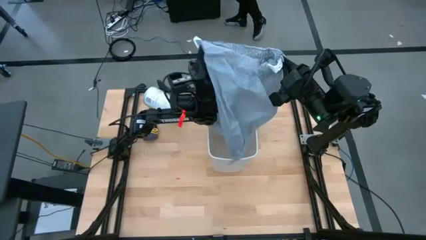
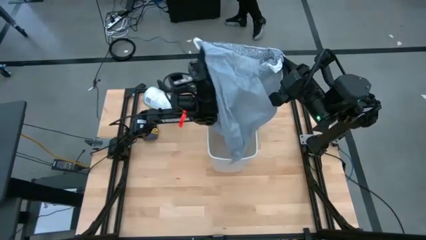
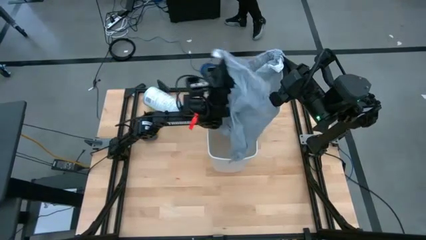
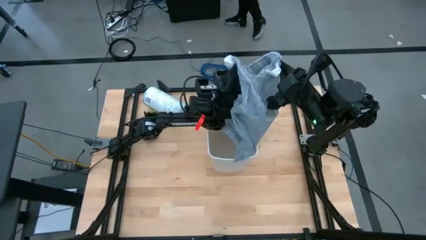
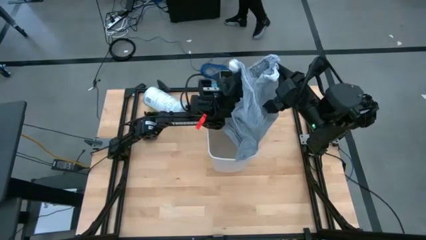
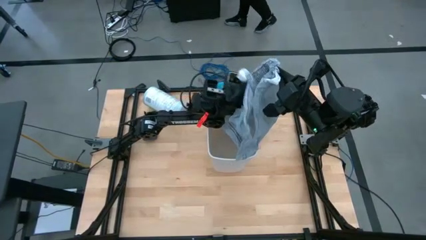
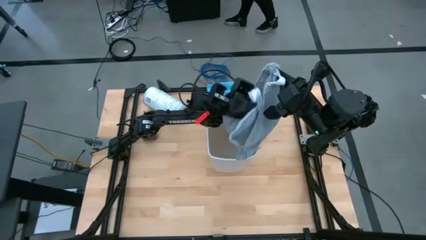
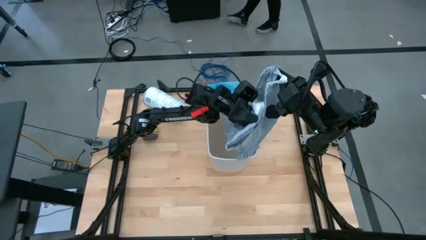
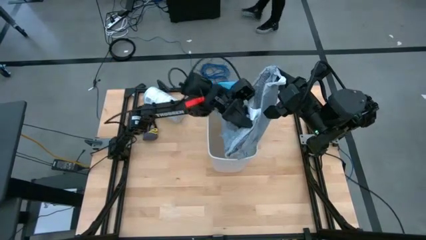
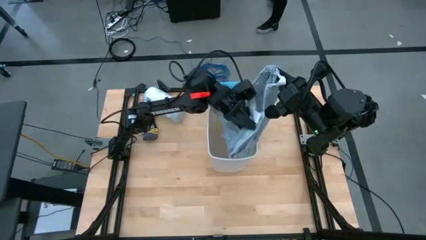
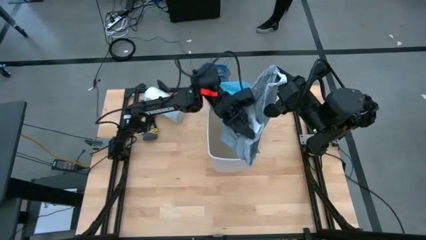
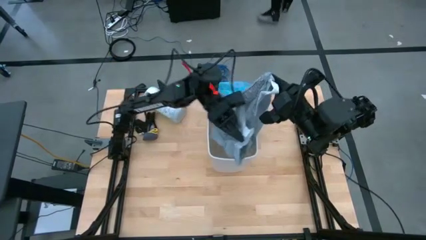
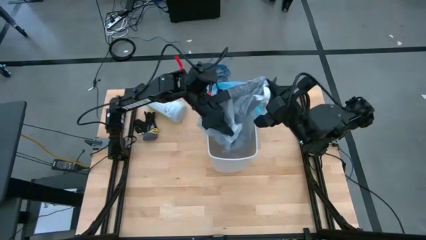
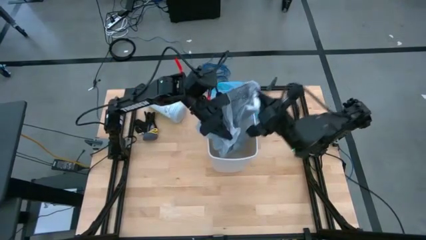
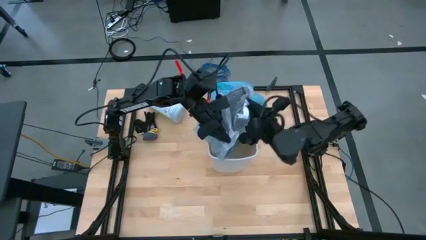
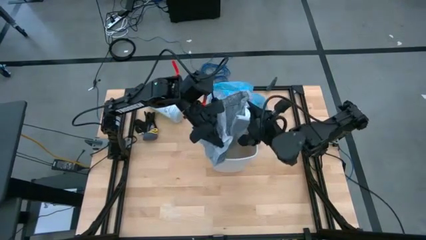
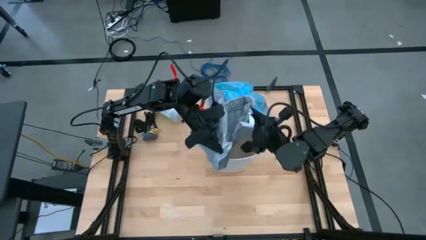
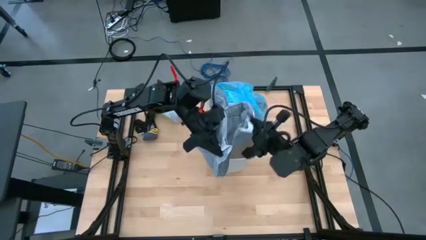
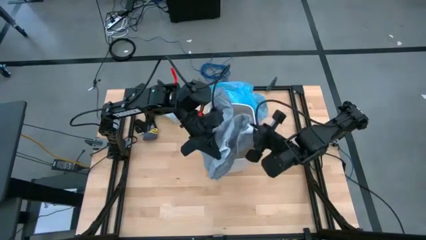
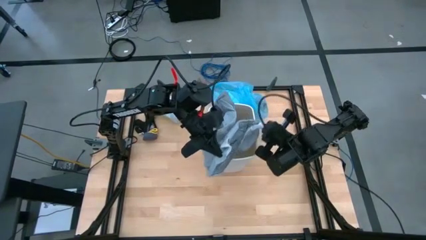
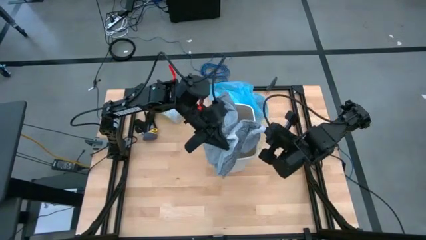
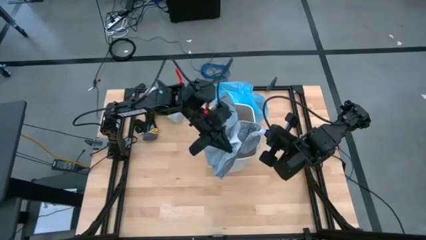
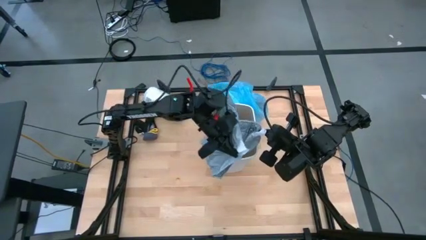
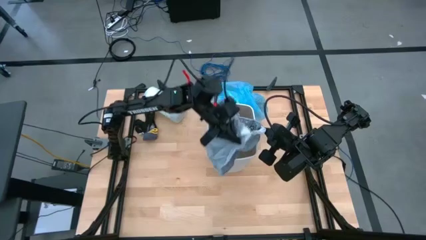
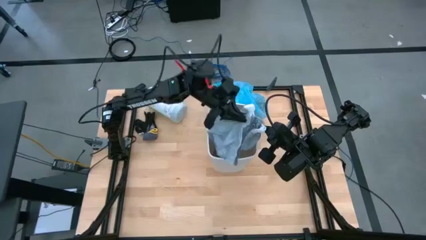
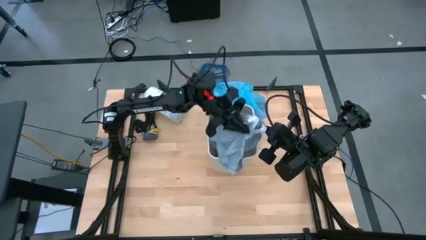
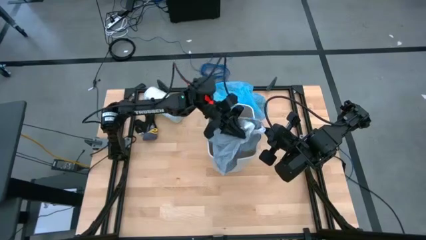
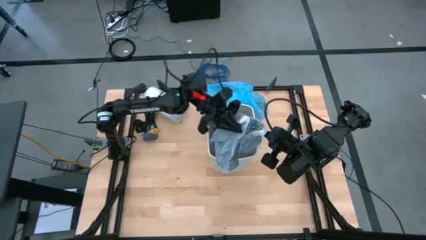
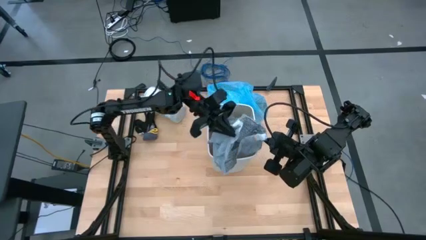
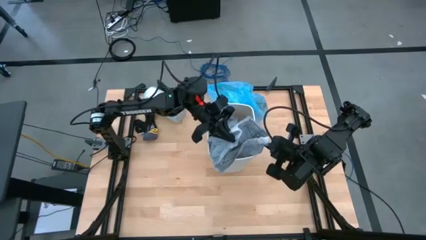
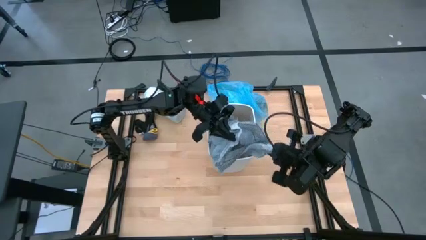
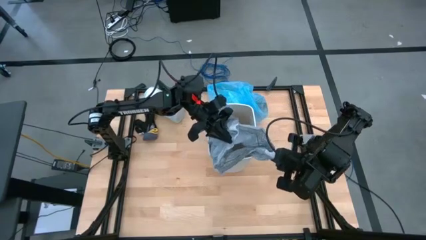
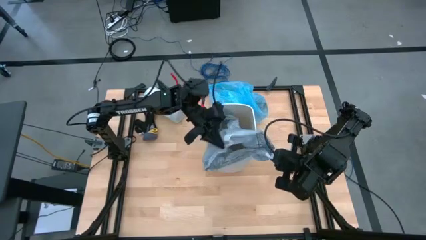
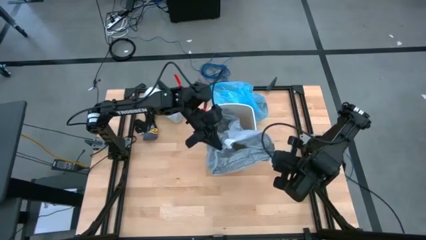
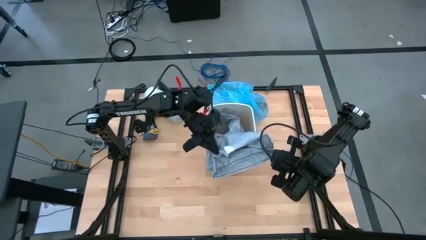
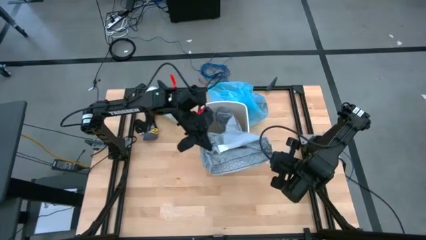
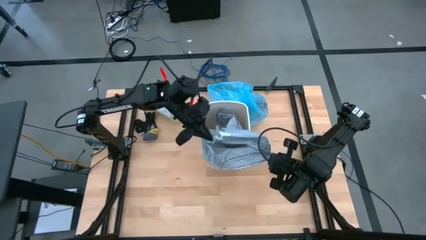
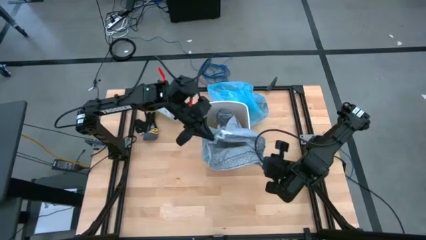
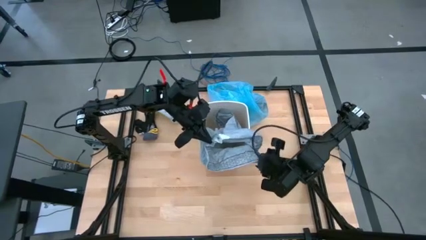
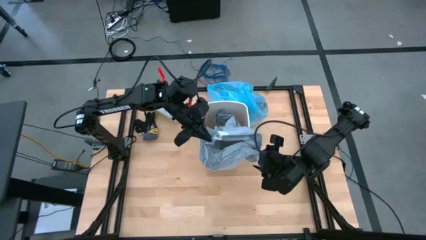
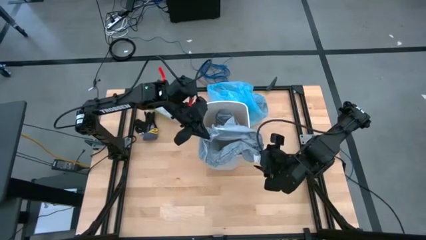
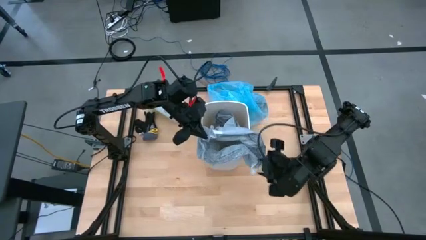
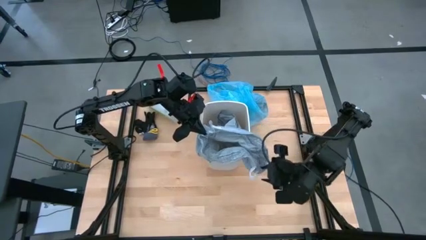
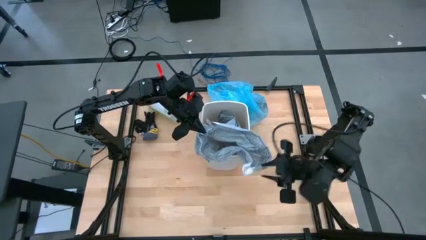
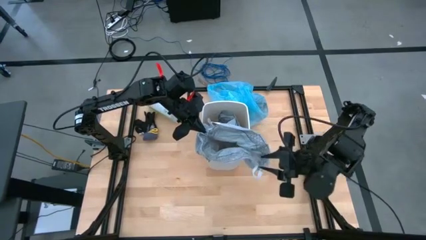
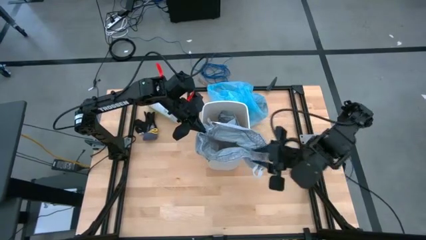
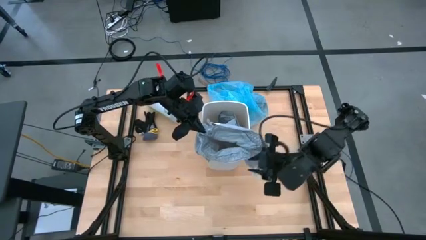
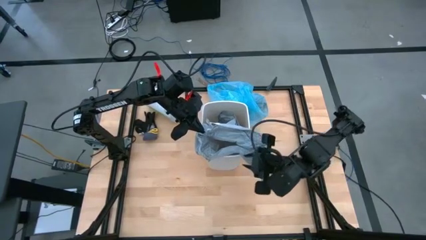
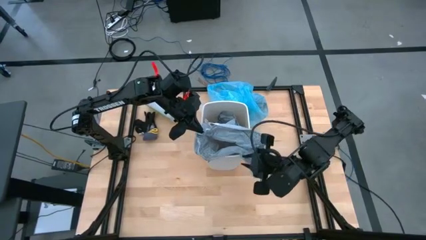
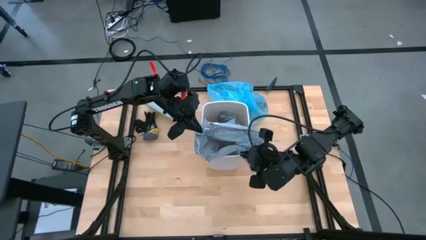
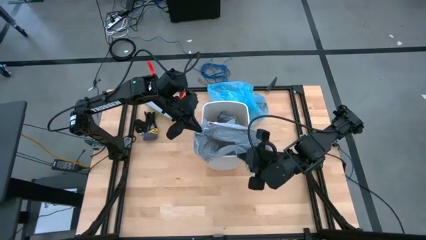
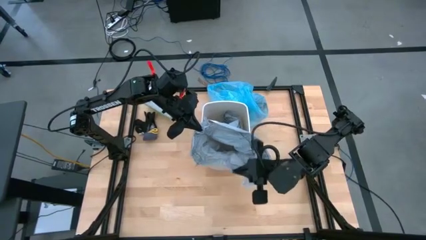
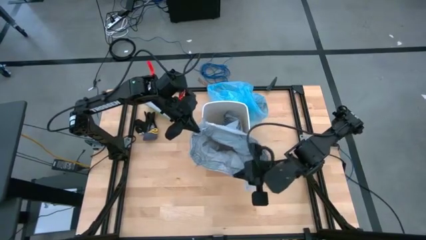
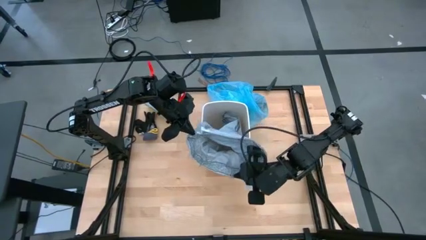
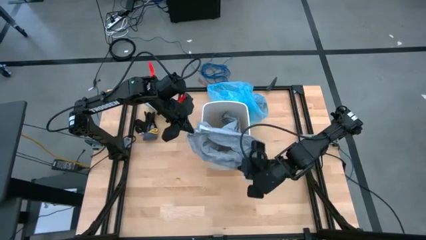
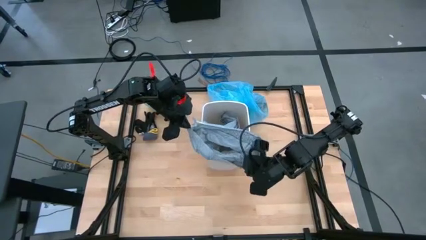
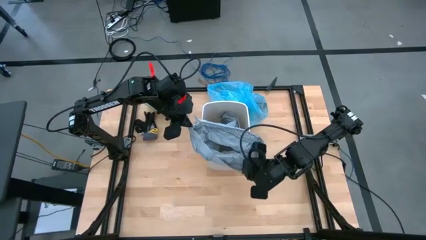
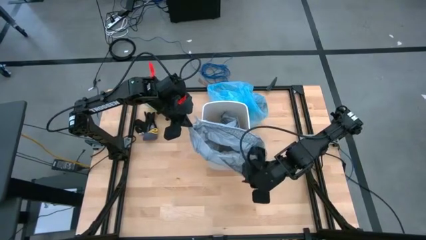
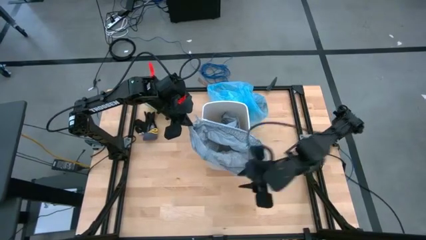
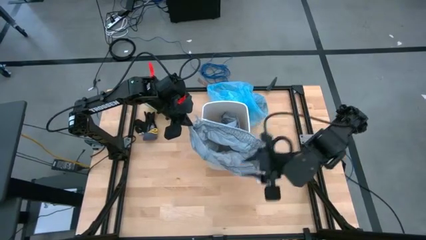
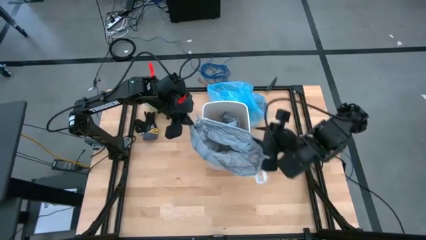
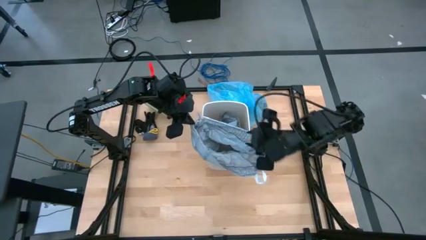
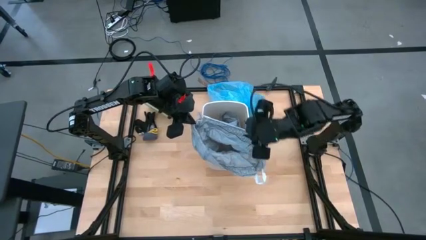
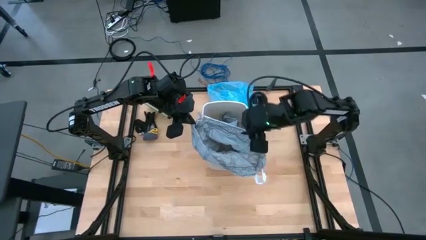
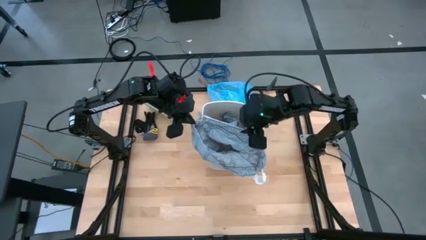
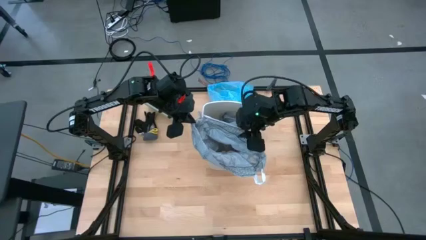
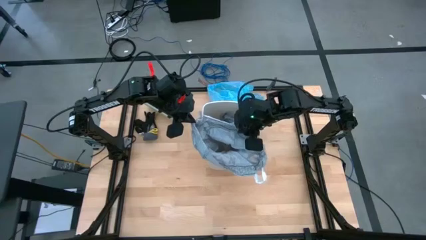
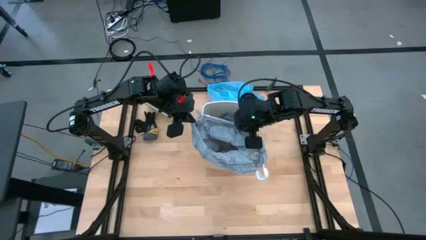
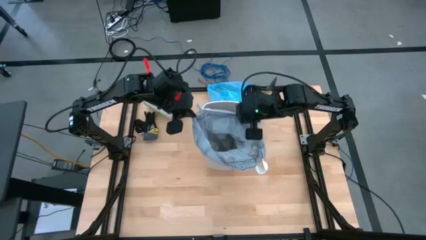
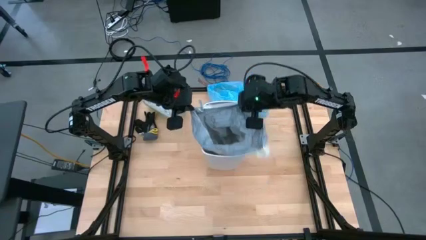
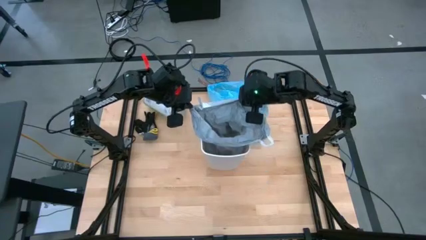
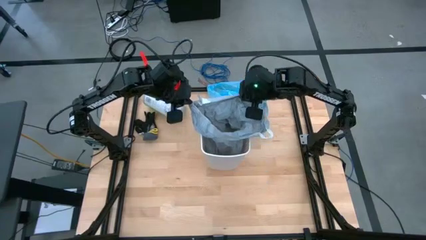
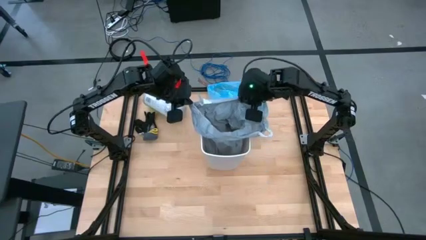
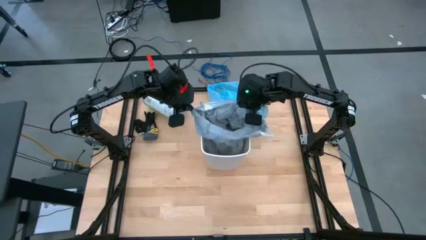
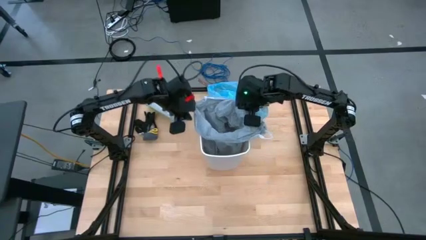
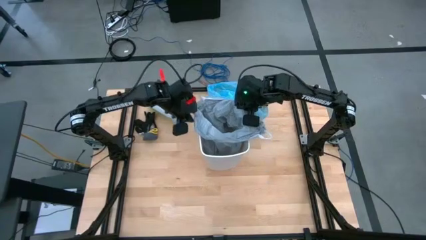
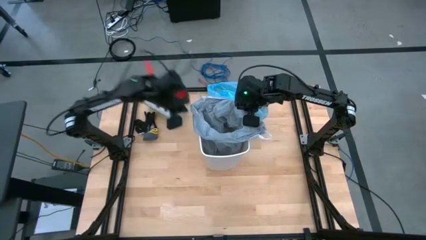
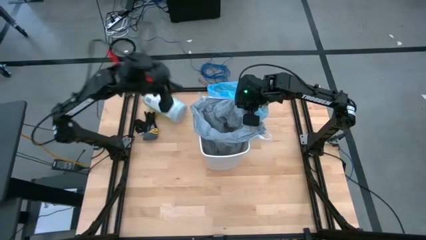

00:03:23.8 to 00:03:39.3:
Task: place trash/remove bag and relplace
Put the gray trash bag into the trash bin

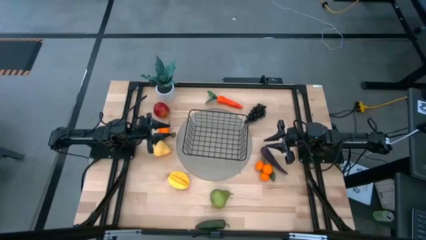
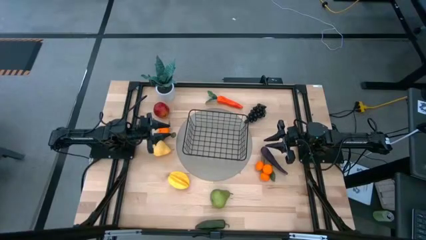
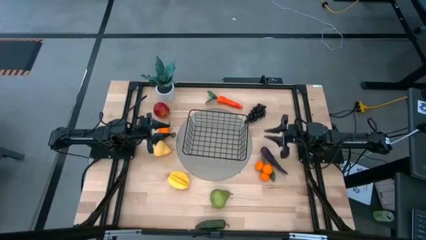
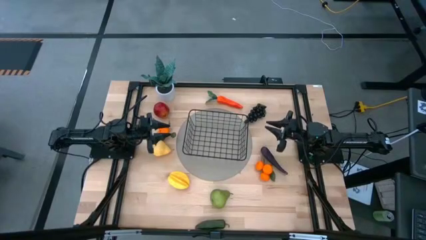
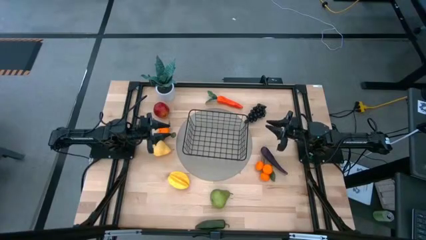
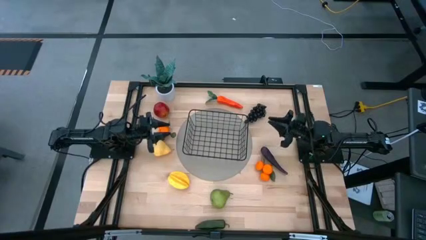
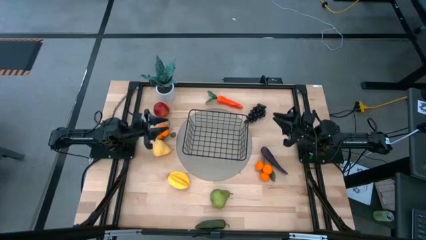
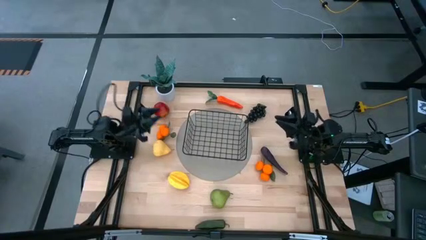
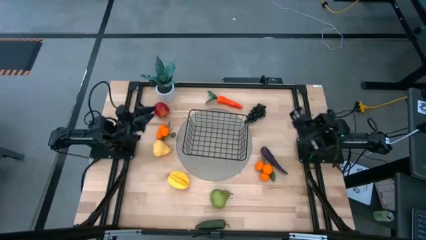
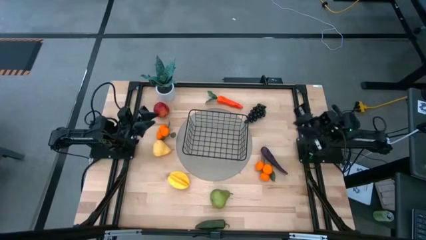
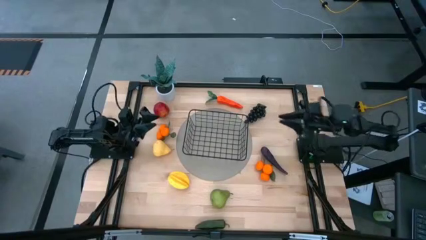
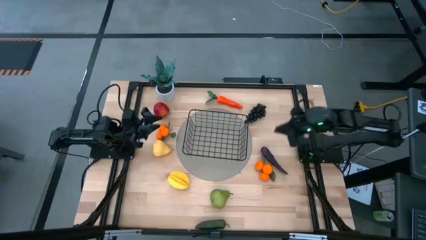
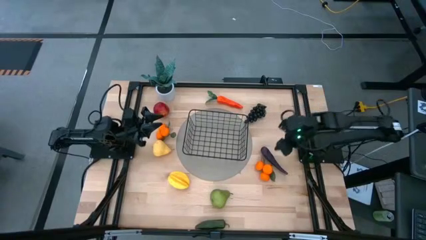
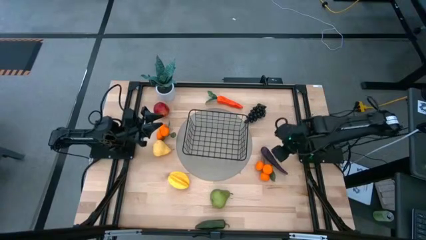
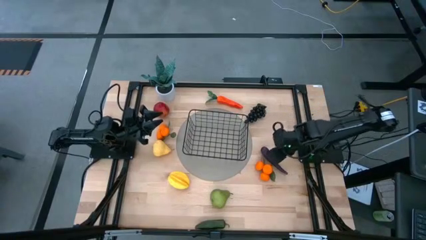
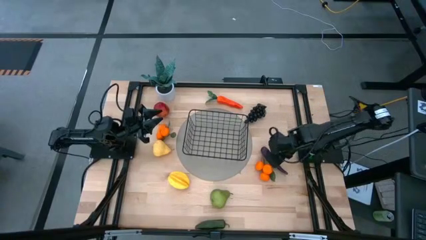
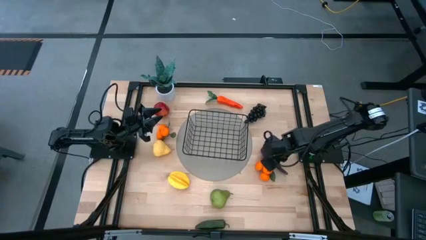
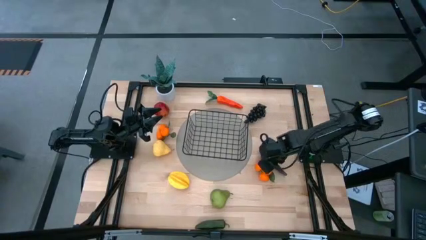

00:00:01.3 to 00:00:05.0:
Task: Build produce basket
Put the purple eggplant into the black wire basket
